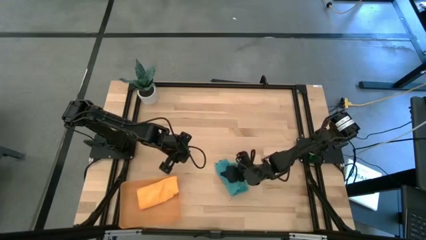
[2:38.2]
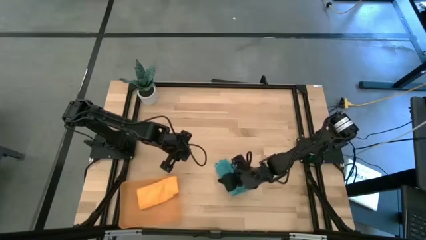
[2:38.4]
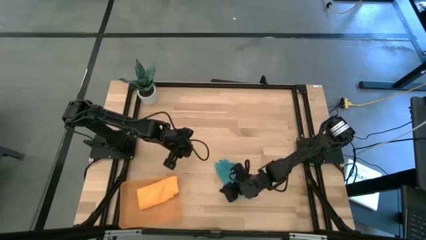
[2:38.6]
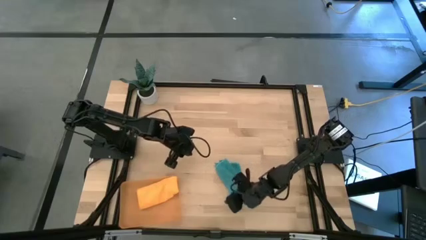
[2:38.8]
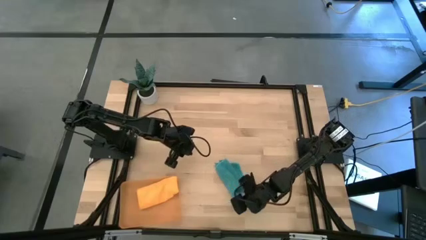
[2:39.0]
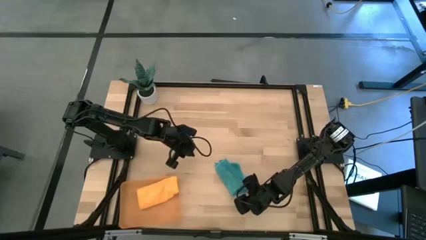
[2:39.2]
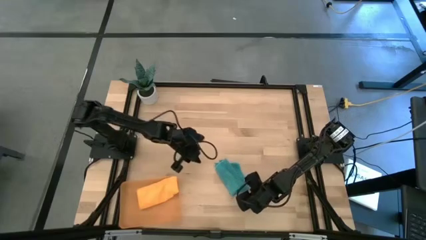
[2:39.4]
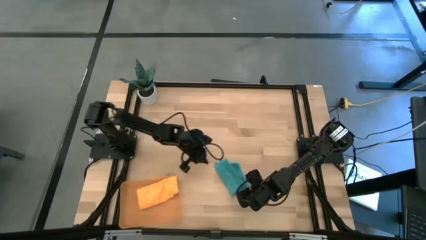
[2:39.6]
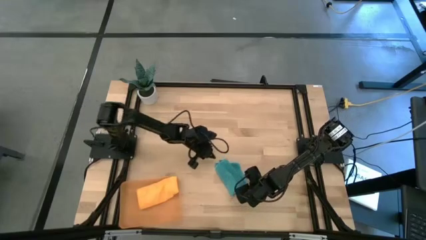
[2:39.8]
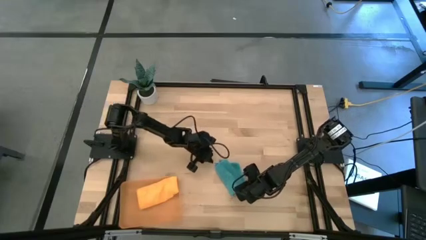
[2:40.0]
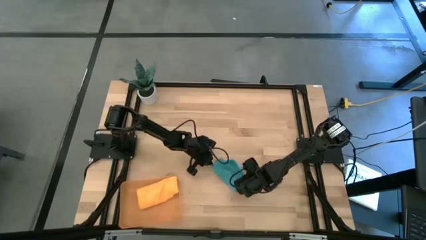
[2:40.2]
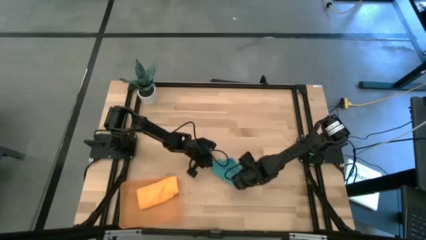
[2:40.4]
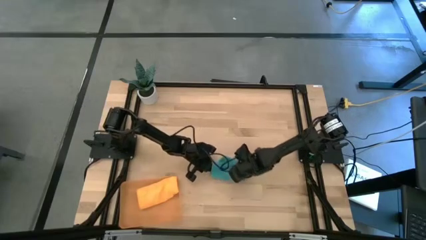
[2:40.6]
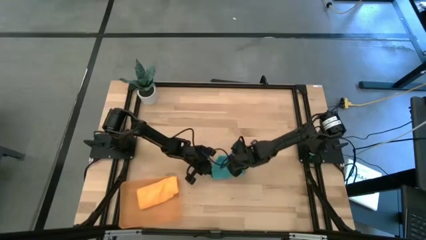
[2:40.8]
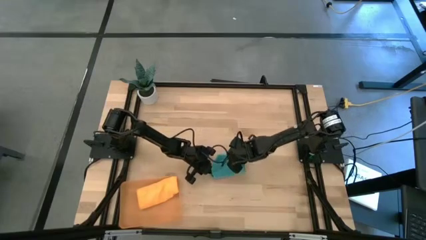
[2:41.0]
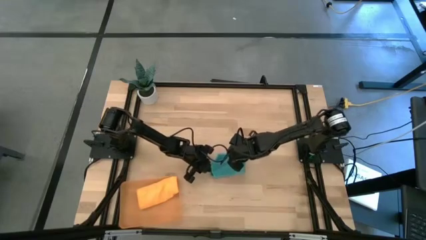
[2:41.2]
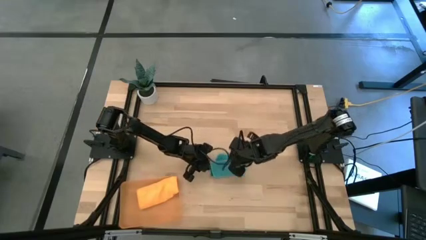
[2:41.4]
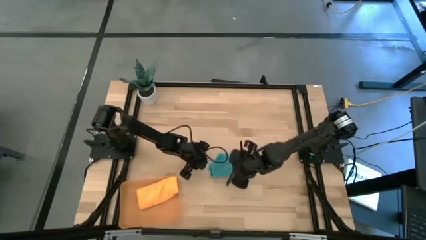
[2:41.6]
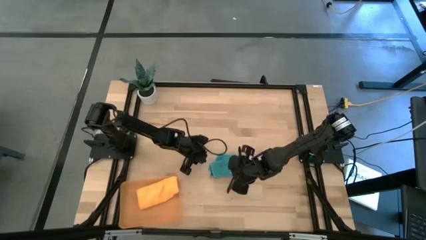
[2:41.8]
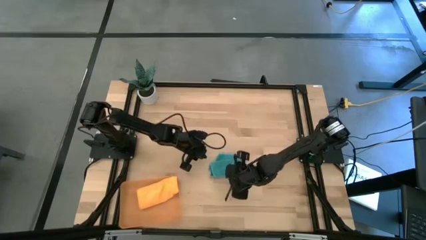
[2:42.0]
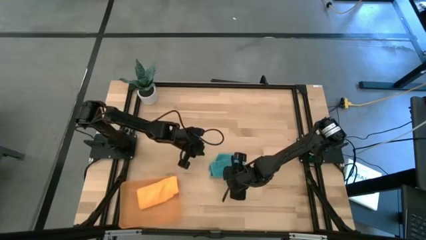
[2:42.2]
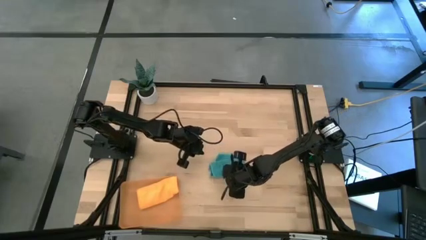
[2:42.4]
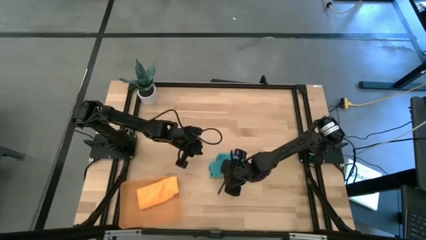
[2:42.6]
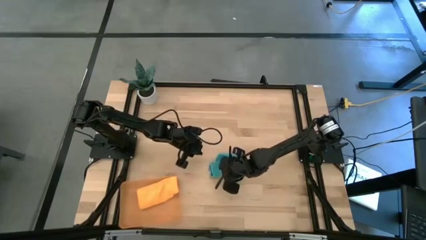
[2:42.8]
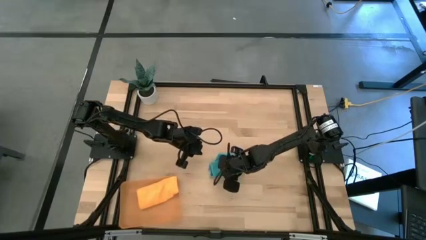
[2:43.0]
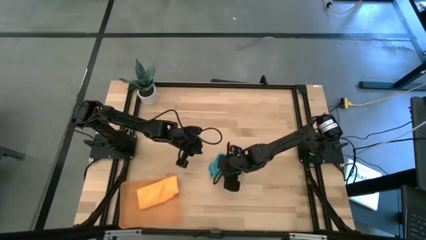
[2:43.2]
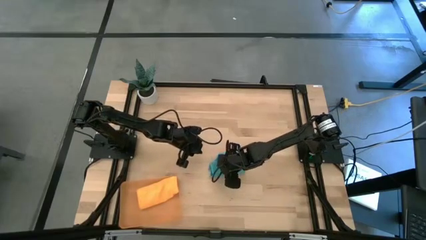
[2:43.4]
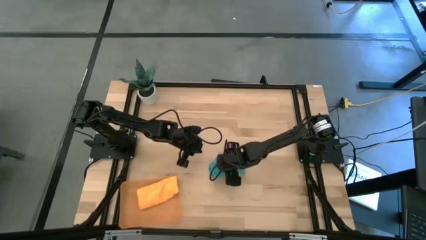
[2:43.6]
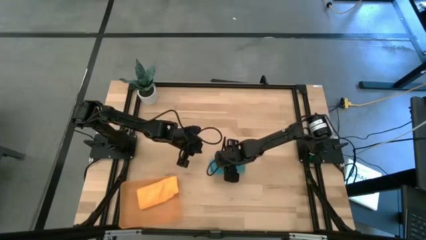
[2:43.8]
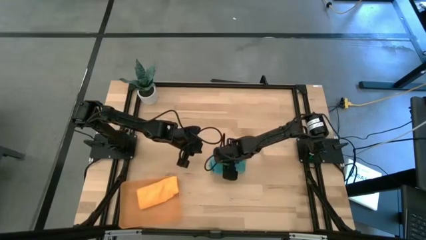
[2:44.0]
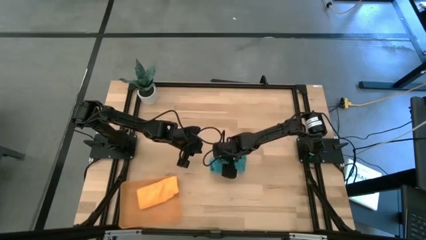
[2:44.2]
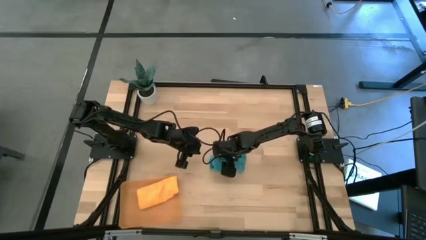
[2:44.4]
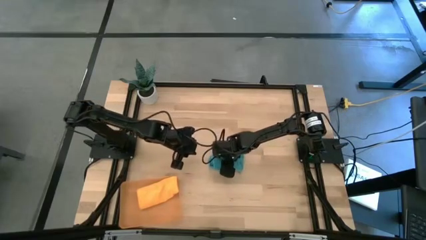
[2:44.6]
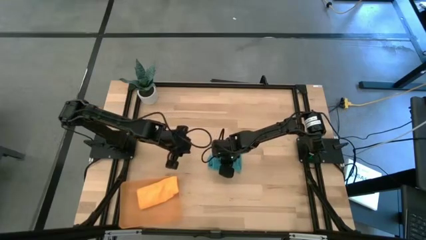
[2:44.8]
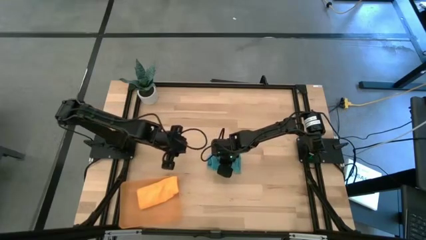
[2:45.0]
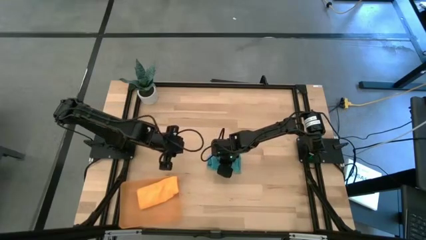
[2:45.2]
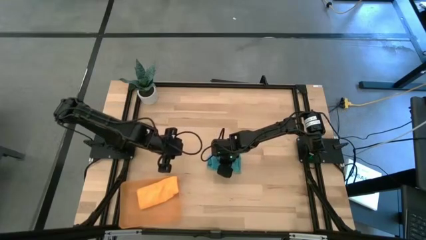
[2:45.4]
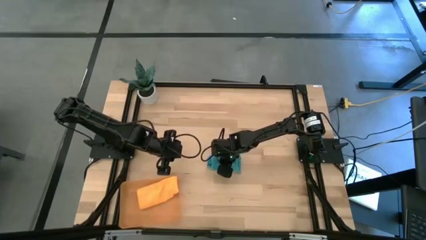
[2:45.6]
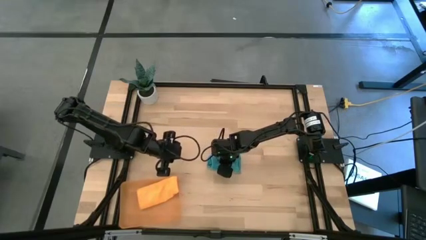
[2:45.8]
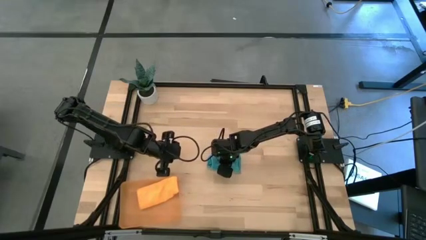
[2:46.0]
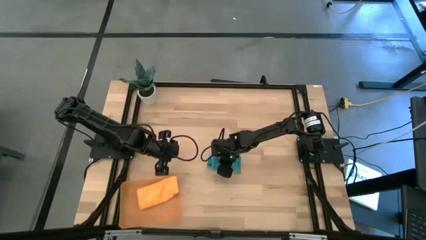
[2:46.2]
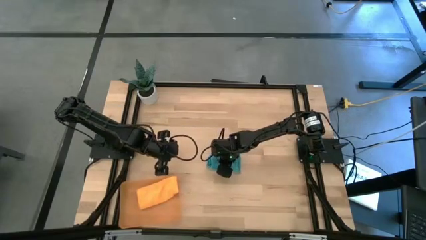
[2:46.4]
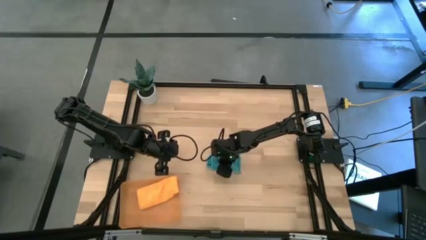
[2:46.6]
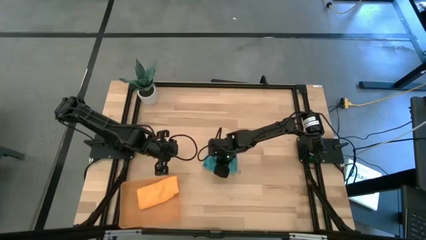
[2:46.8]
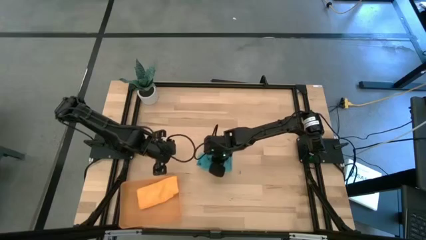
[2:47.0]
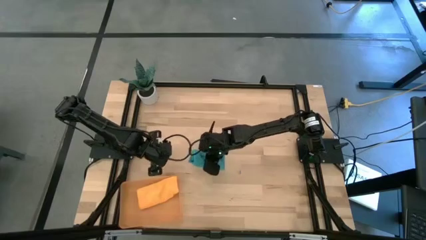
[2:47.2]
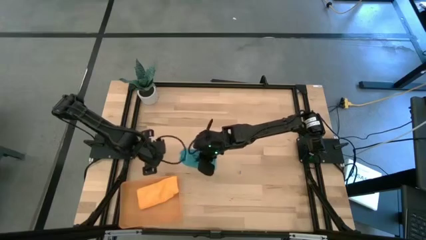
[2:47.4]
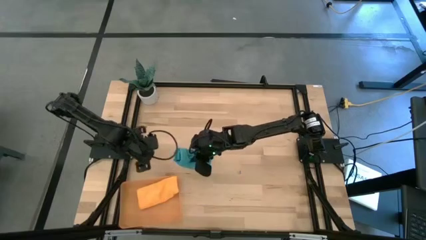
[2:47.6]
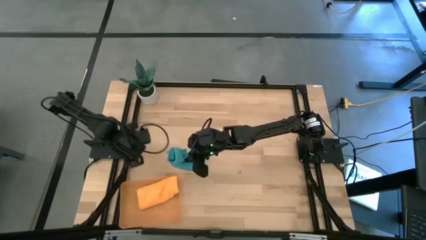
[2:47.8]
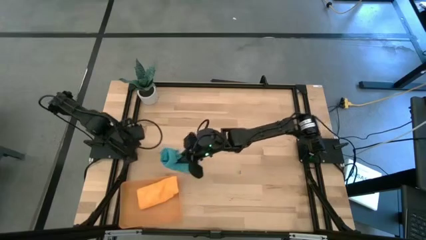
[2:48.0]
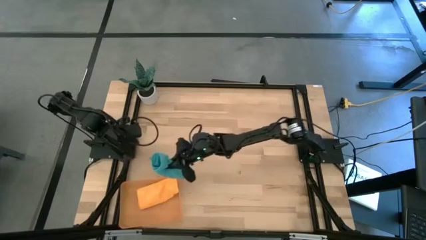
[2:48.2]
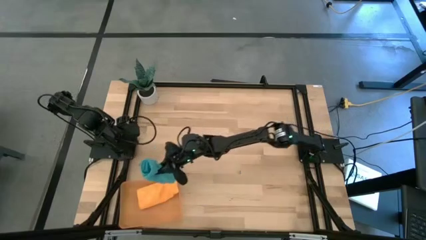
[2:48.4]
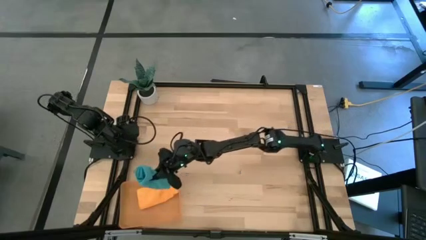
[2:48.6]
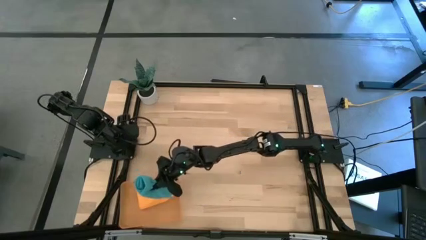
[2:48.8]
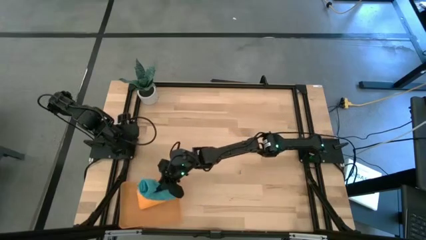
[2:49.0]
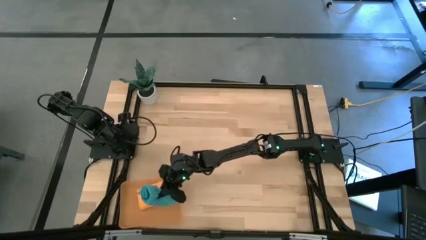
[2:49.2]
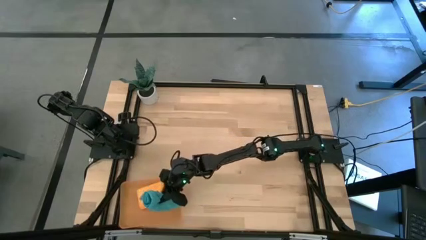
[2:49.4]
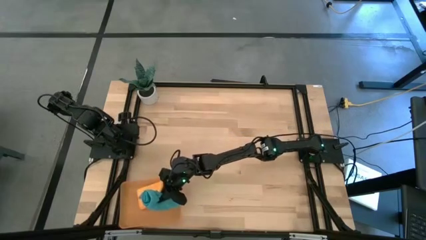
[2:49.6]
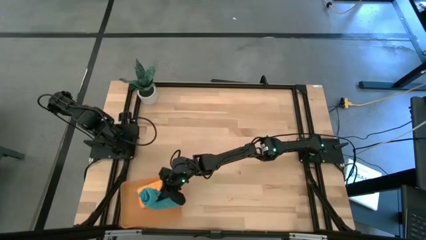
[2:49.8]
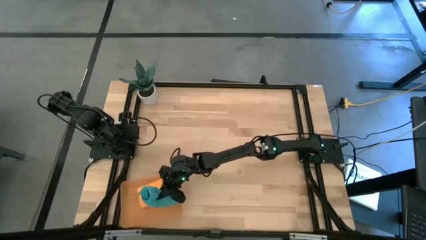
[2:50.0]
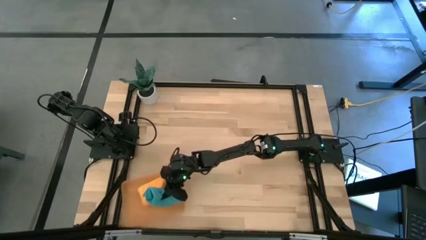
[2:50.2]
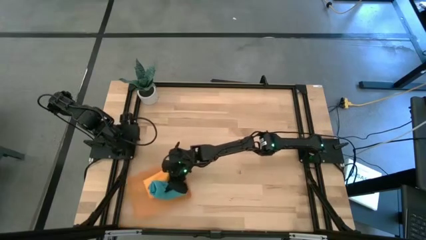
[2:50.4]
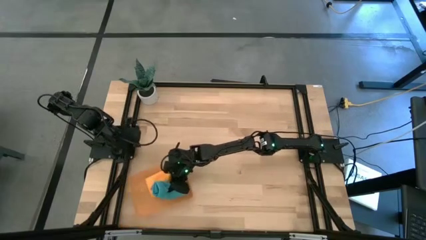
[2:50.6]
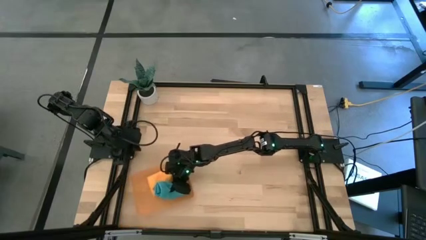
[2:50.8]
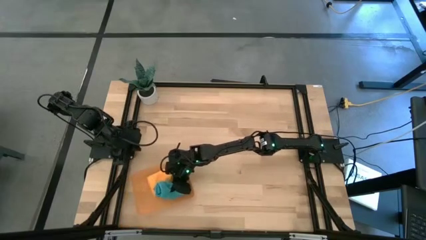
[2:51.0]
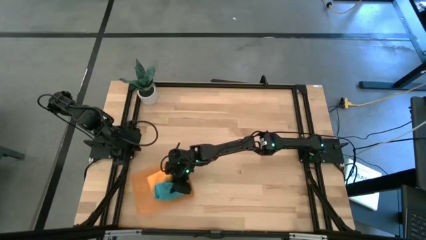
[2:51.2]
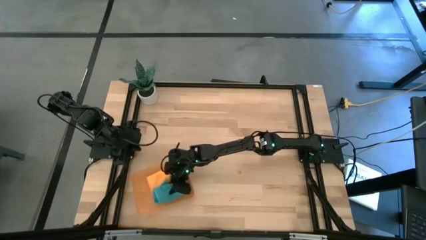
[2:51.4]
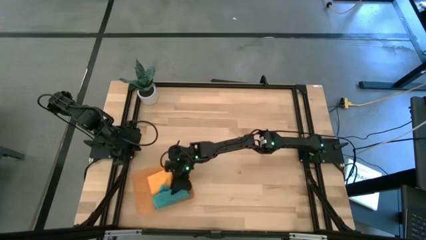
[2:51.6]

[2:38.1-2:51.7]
Task: Roll microfiber towels into tight, uniform cylinder then place into a basket
Put the blue microfiber cloth into the orange transparent bin

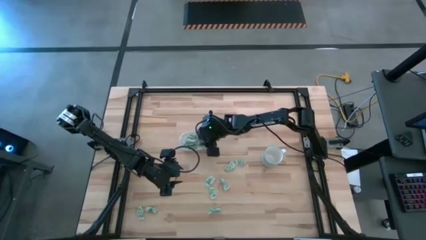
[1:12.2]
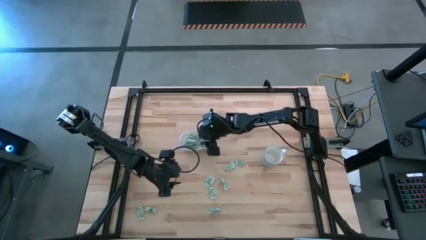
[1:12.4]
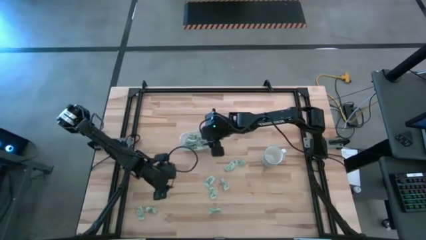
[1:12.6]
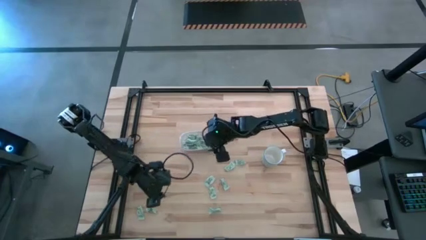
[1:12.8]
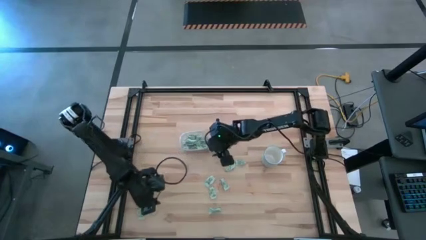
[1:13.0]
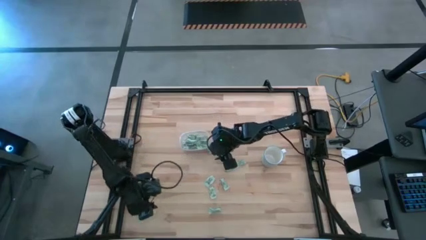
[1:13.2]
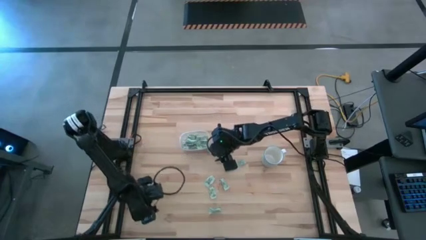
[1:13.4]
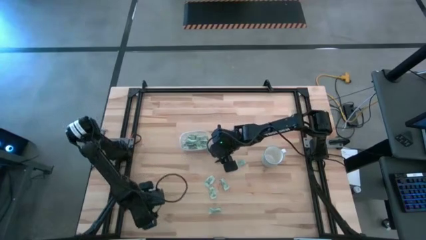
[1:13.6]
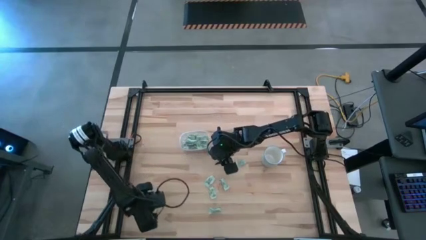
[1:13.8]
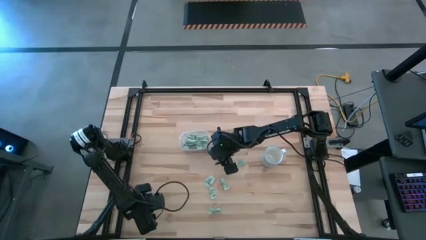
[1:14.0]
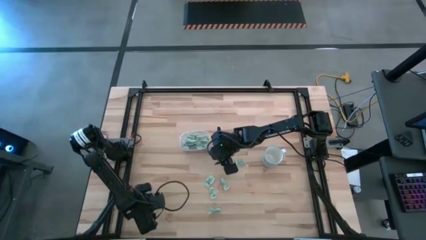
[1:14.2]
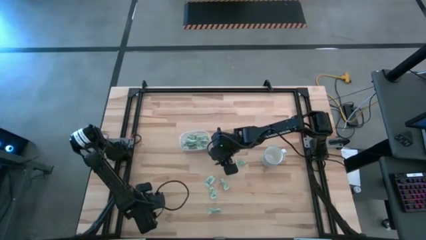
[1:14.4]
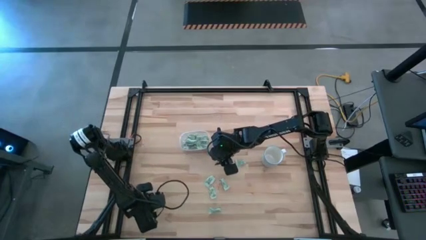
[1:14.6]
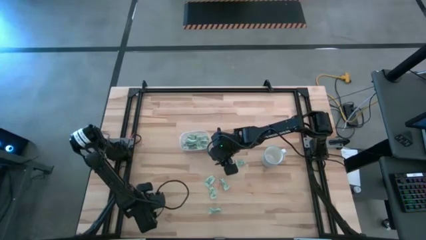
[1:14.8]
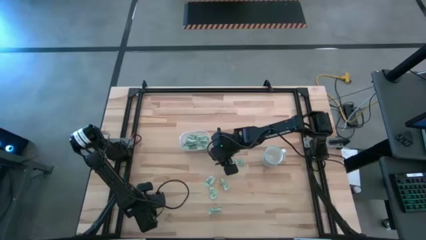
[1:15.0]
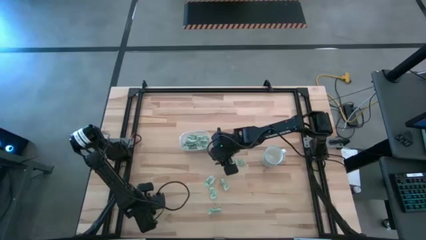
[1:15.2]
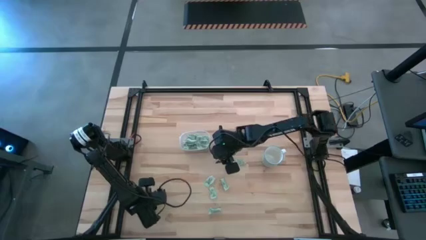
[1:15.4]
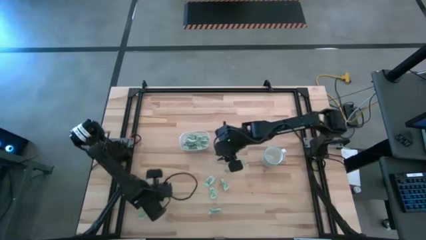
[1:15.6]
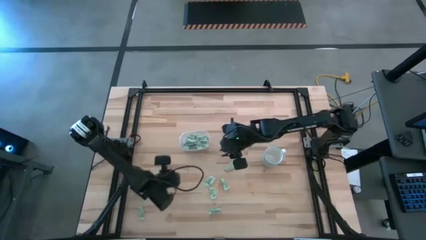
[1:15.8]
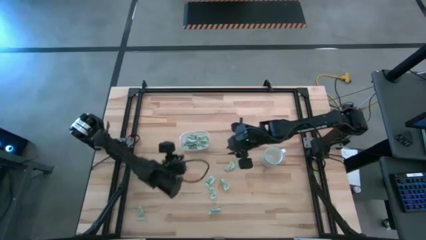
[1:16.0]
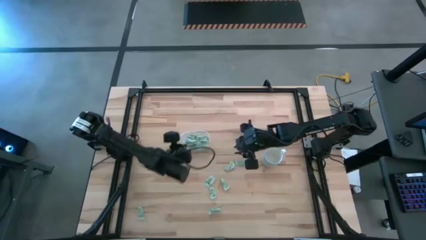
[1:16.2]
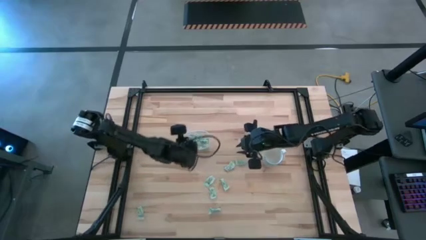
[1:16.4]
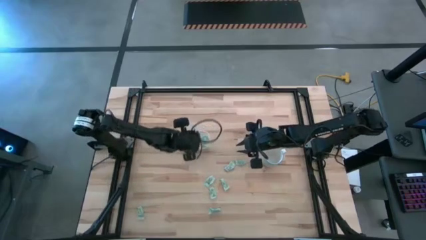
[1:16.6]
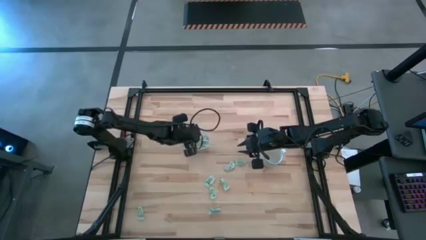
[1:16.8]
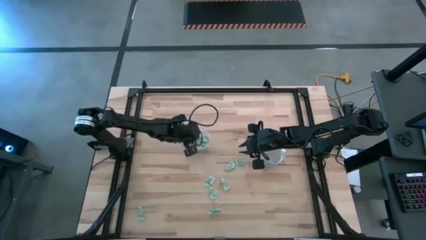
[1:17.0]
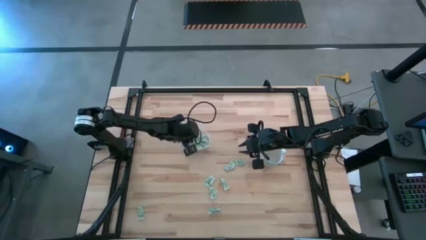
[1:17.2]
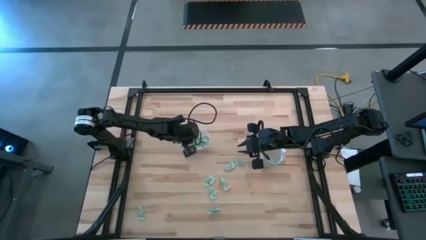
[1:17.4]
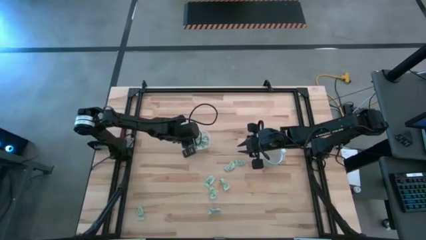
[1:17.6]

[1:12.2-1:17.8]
Task: Pick and place Stevia / Truvia into bins
Put the stevia packet into the transparent bin
